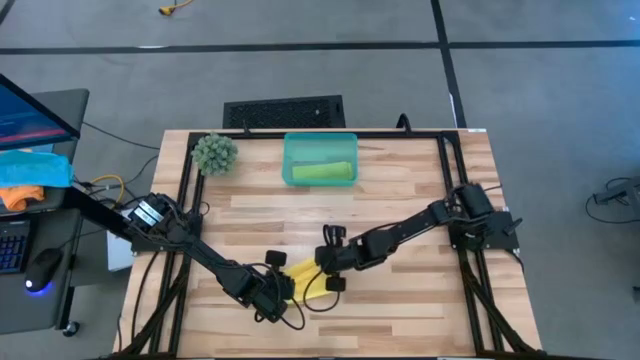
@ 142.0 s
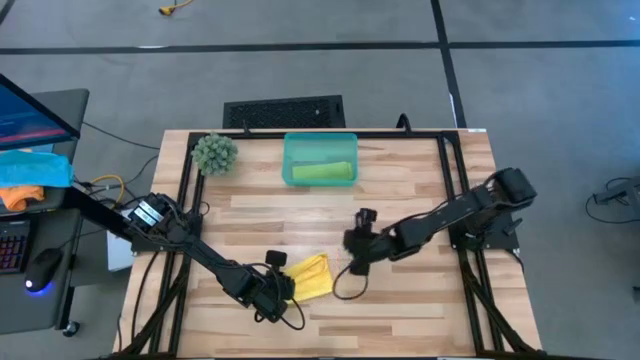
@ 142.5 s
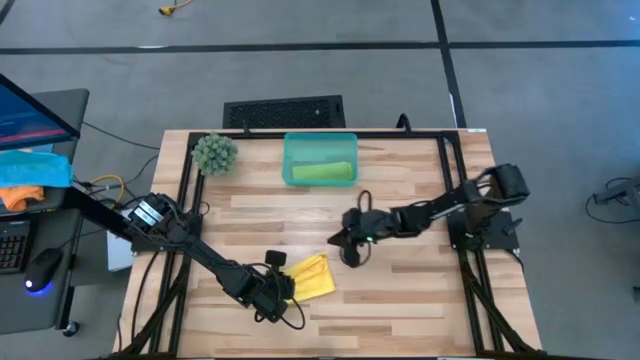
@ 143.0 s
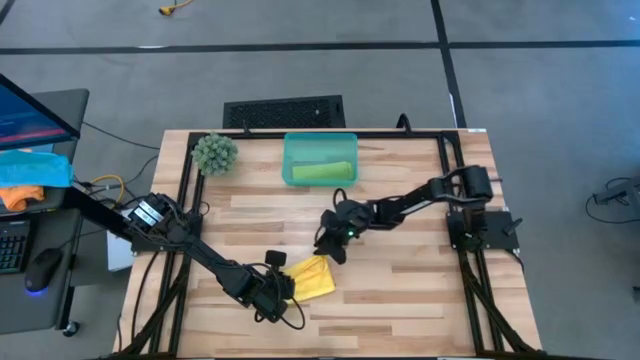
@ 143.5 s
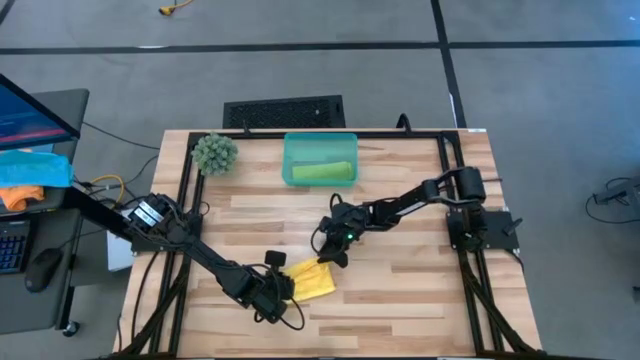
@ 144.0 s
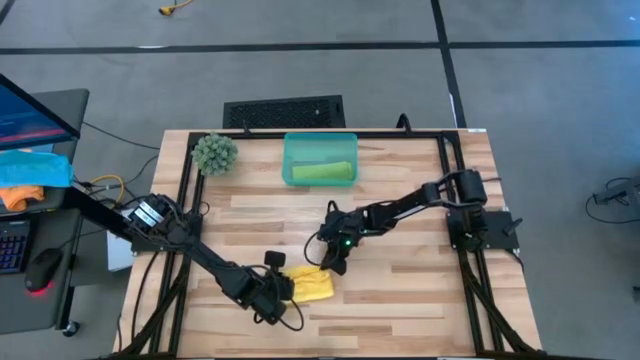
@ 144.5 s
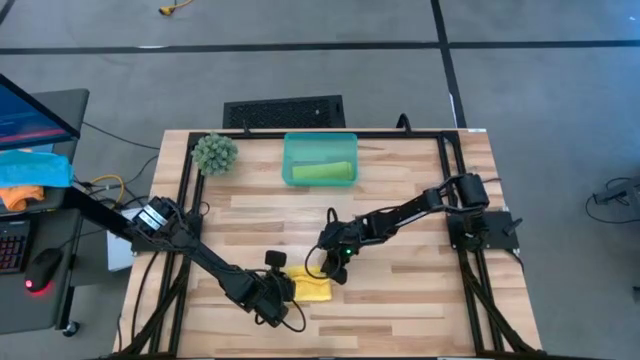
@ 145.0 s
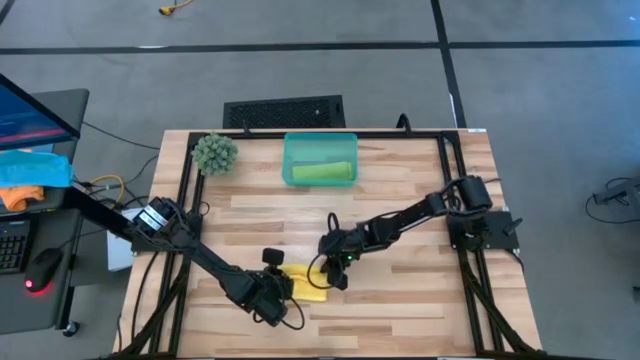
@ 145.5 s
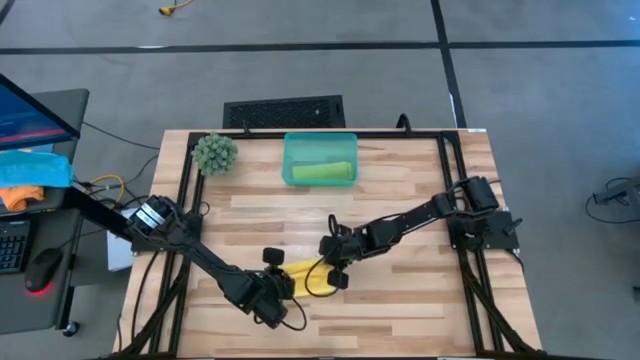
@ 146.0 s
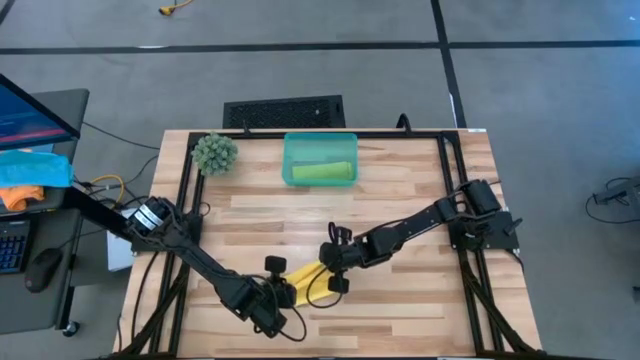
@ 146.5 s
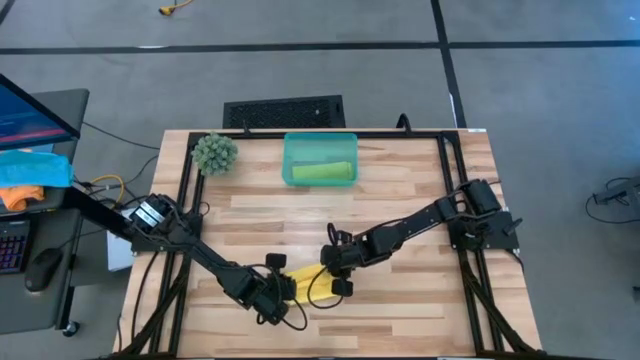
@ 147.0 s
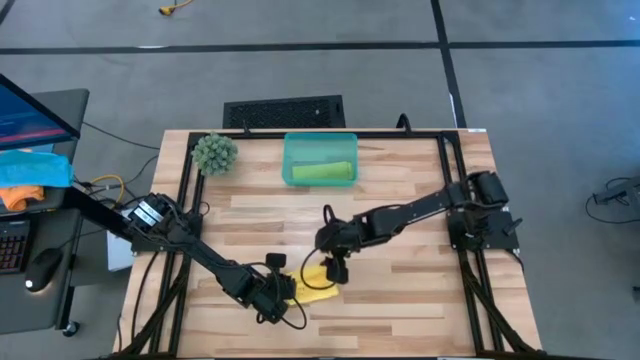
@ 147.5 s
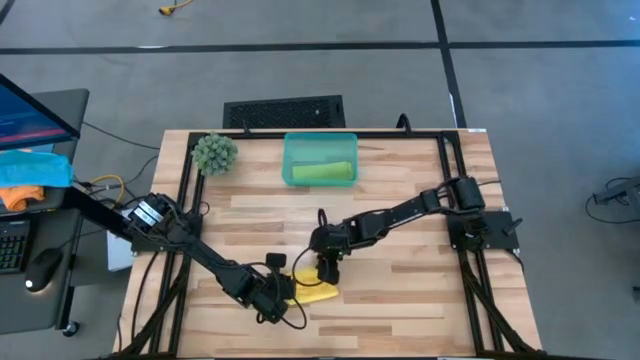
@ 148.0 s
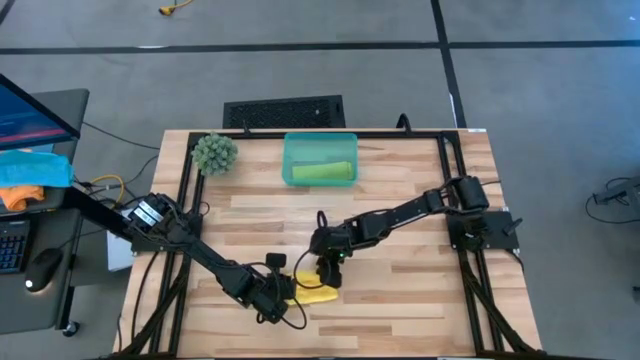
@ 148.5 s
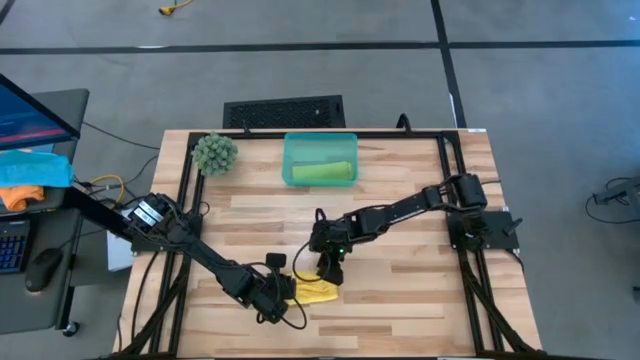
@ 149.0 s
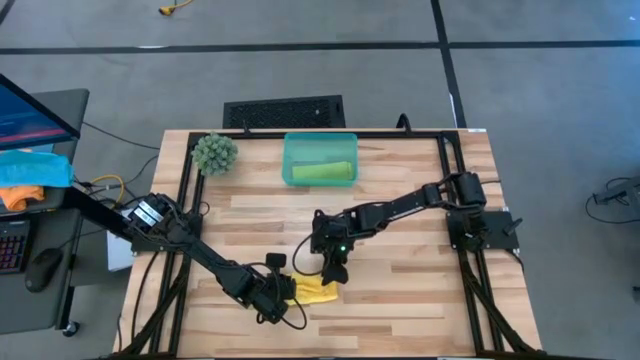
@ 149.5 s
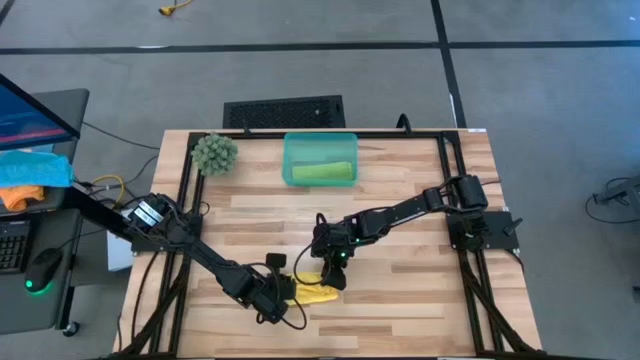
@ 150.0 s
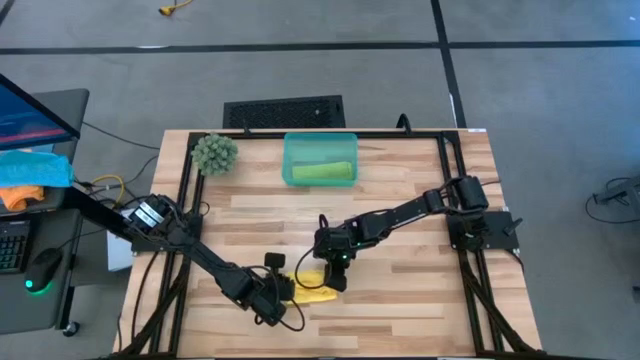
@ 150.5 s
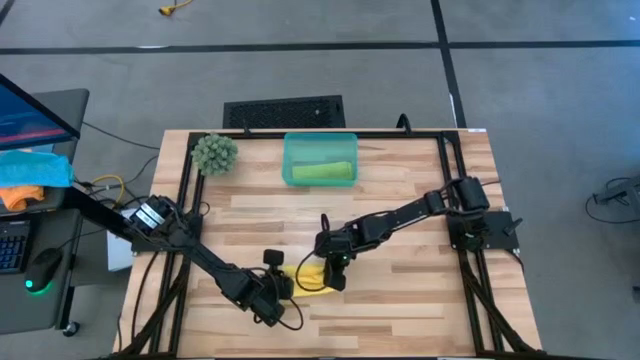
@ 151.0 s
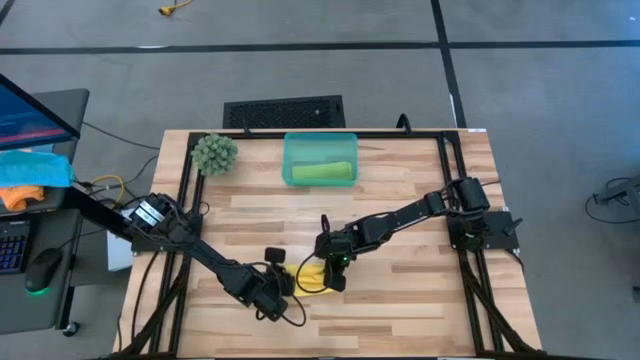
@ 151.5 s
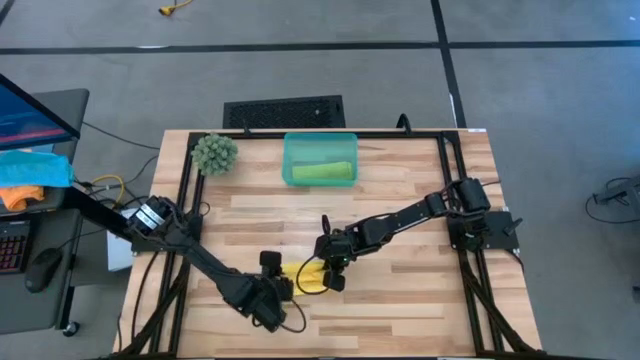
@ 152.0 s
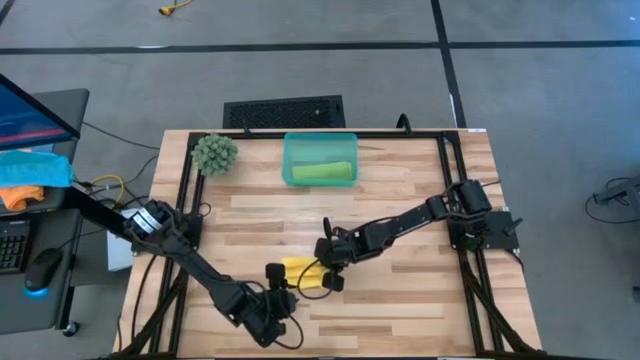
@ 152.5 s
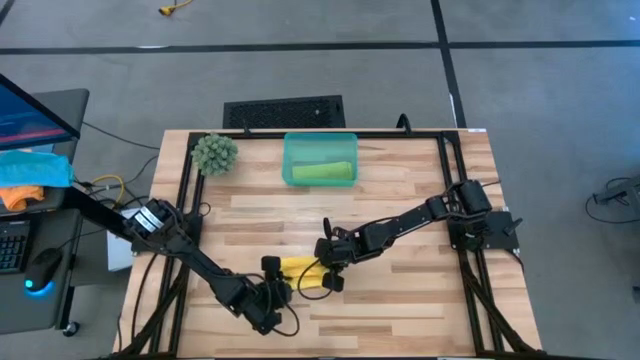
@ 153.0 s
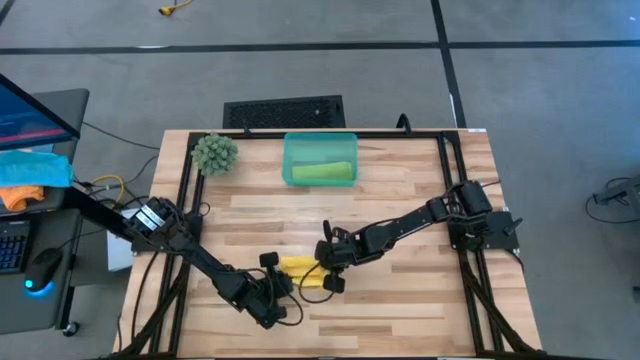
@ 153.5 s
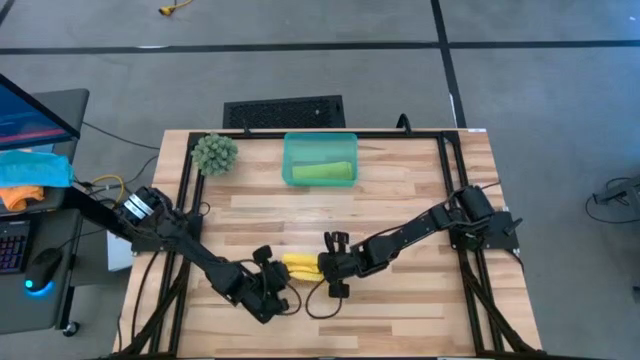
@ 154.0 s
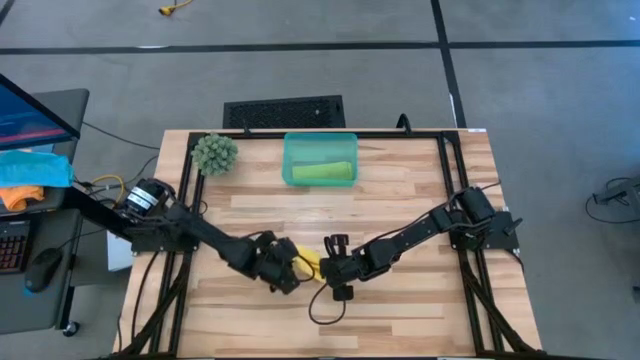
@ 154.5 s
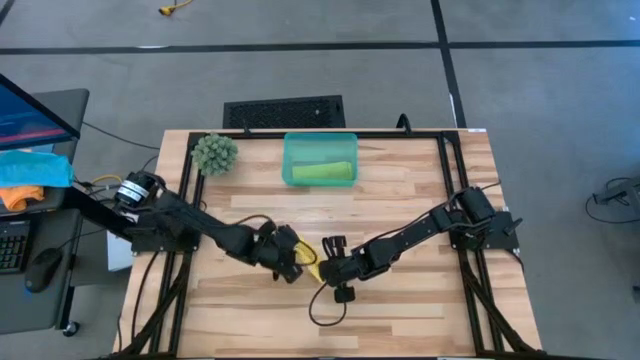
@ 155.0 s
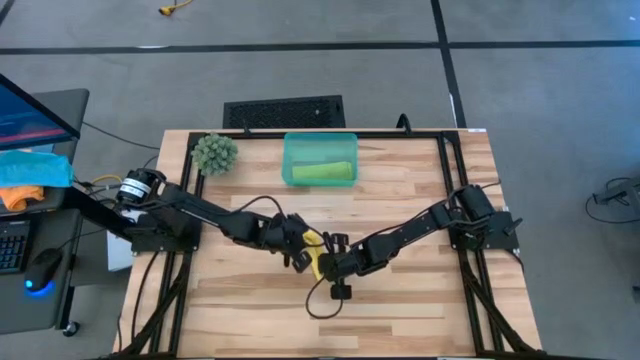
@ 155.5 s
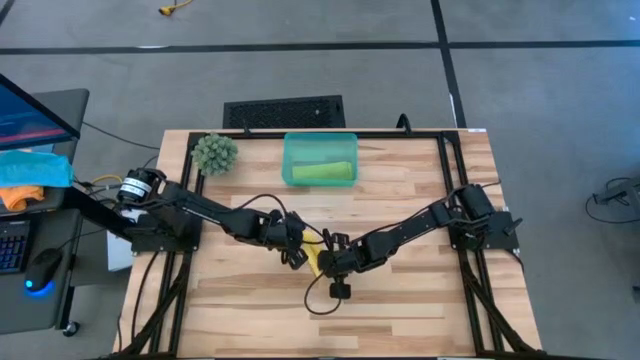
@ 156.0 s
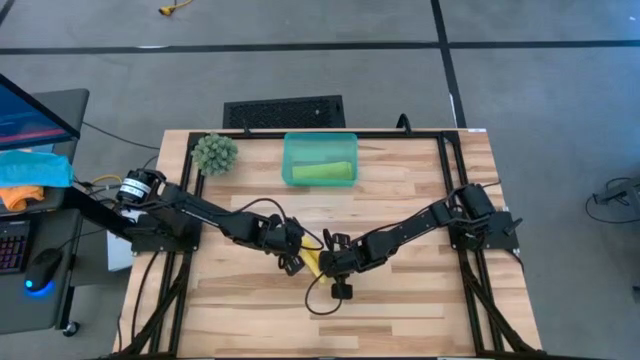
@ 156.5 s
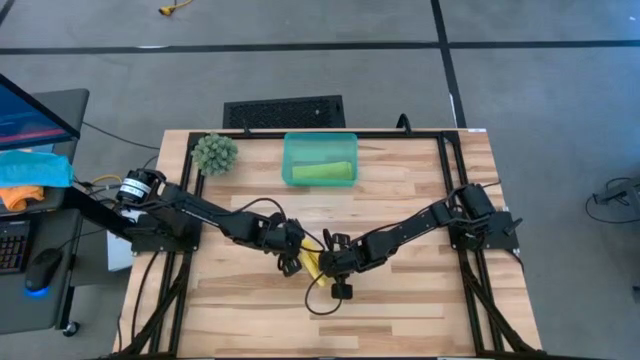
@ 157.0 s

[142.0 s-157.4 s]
Task: Roll microfiber towels into tight, uniform cylinder then place into a basket
Roll the yellow microfiber cloth

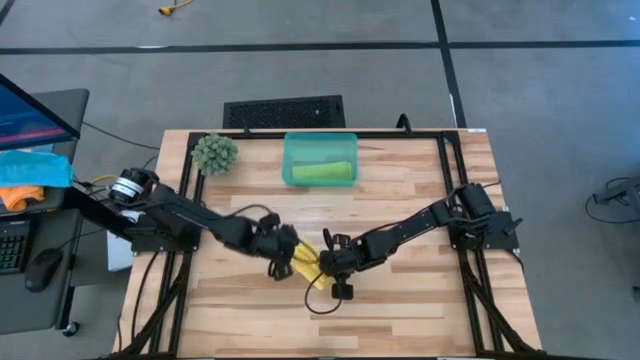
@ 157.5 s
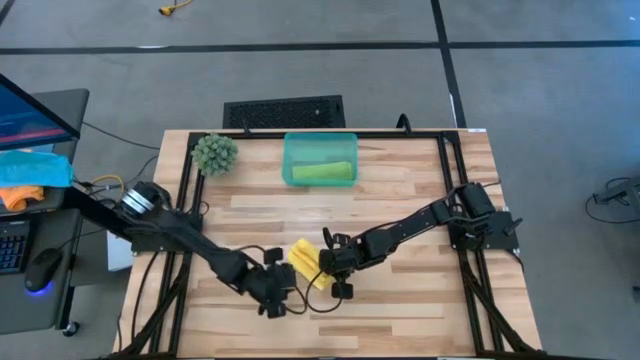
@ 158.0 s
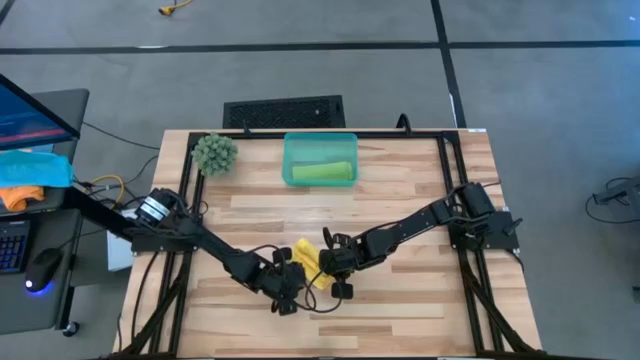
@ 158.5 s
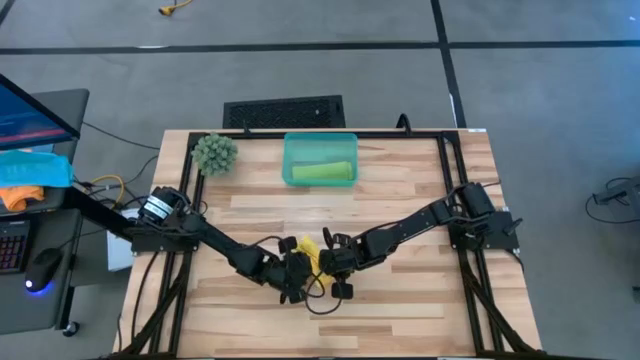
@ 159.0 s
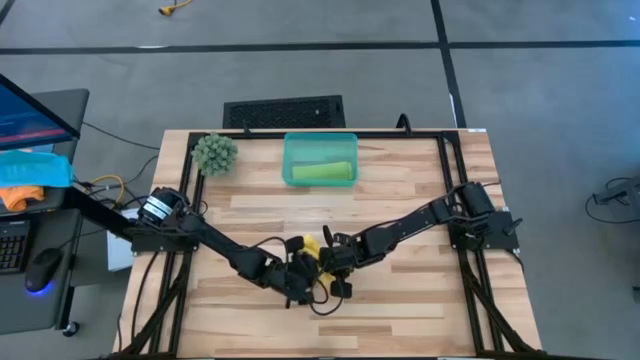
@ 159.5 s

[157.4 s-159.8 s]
Roll the yellow microfiber cloth
